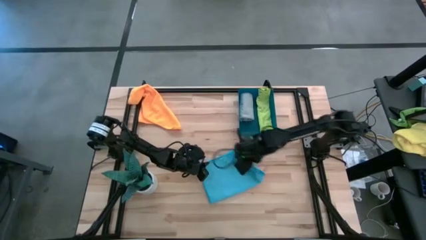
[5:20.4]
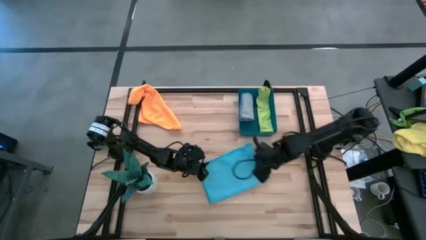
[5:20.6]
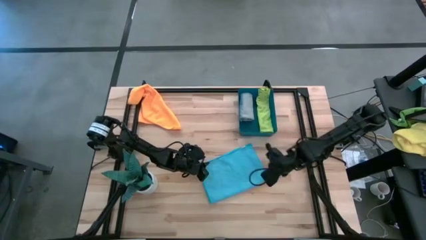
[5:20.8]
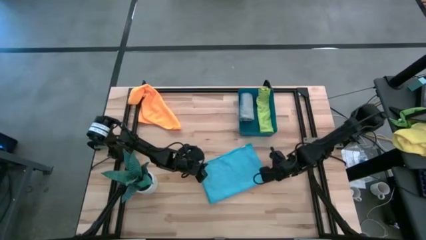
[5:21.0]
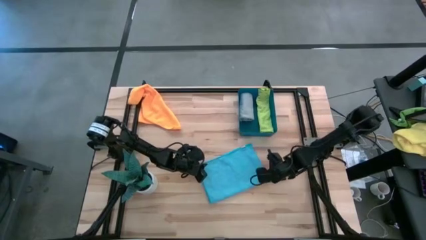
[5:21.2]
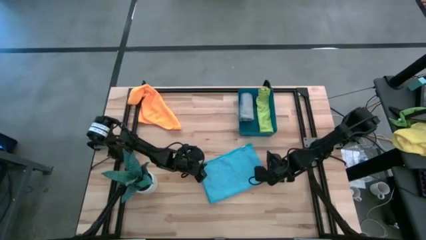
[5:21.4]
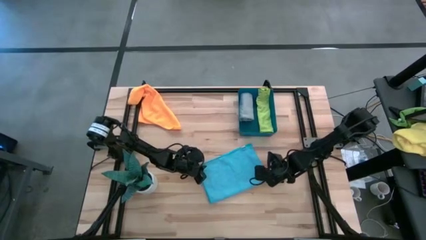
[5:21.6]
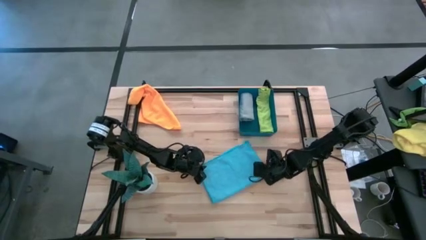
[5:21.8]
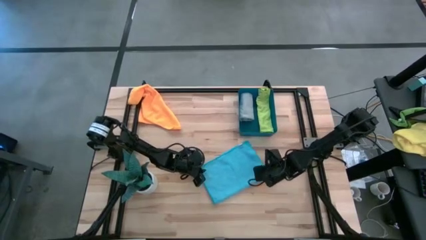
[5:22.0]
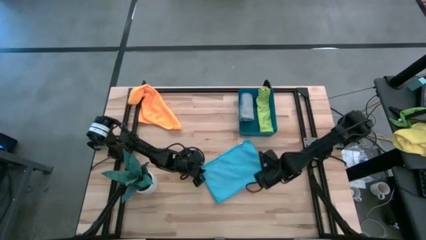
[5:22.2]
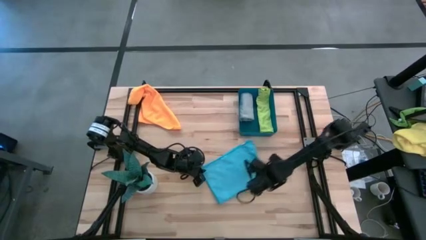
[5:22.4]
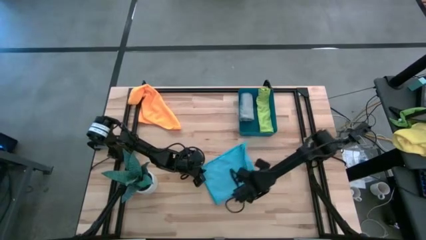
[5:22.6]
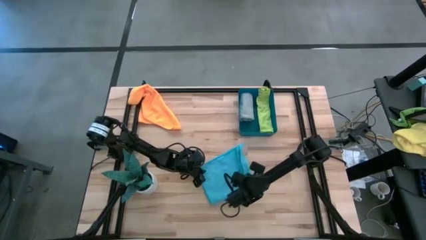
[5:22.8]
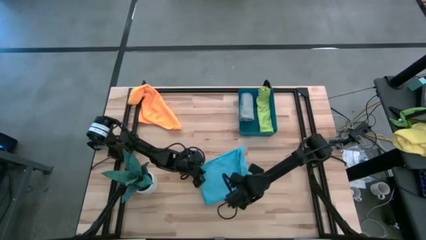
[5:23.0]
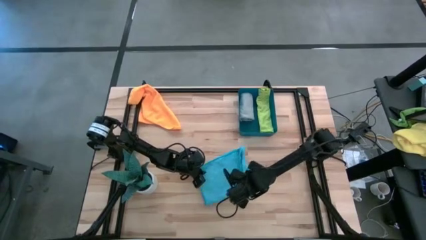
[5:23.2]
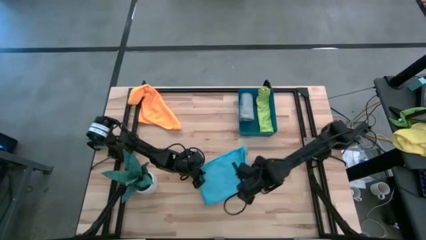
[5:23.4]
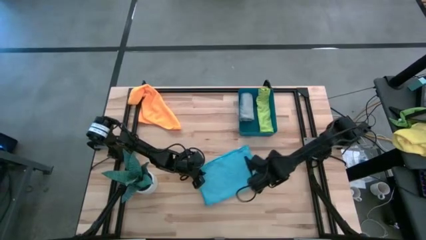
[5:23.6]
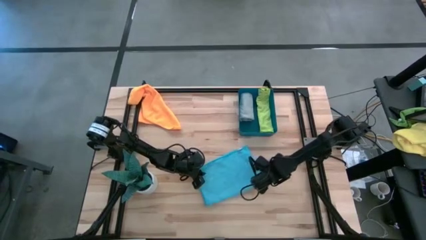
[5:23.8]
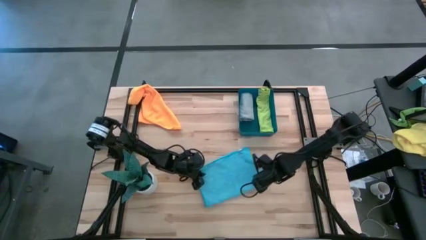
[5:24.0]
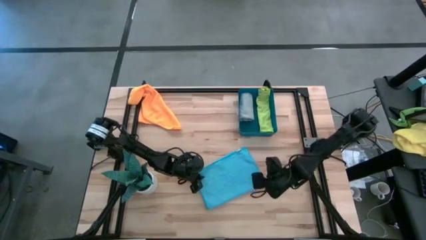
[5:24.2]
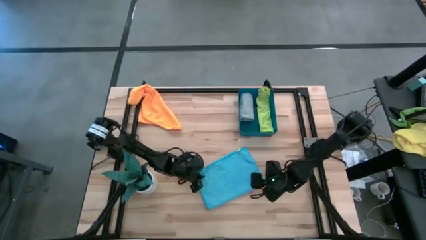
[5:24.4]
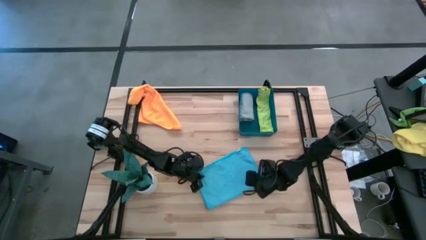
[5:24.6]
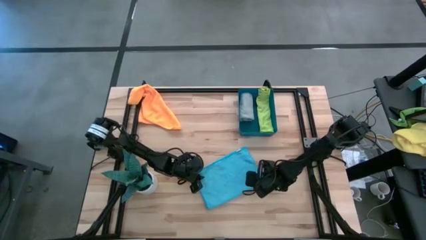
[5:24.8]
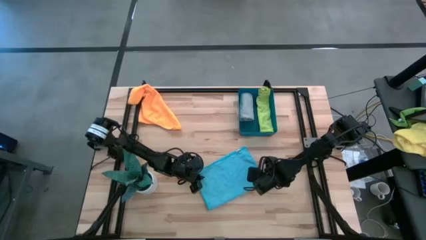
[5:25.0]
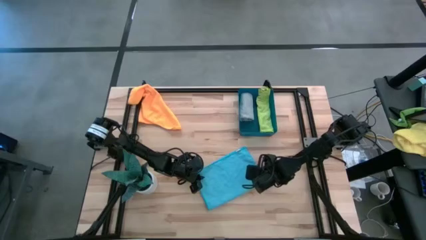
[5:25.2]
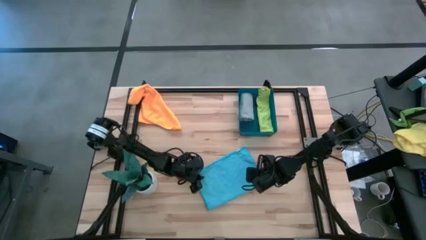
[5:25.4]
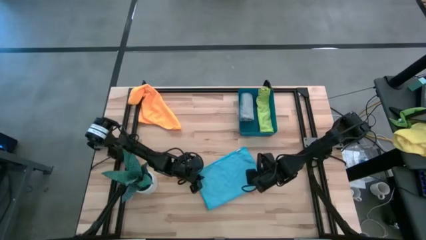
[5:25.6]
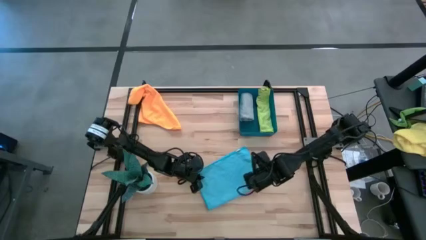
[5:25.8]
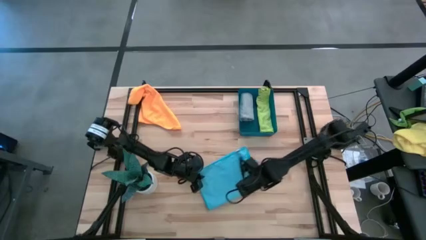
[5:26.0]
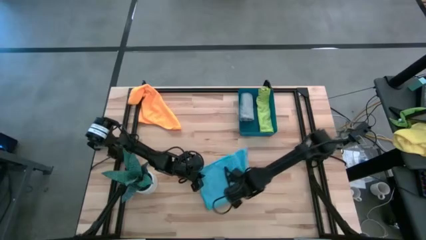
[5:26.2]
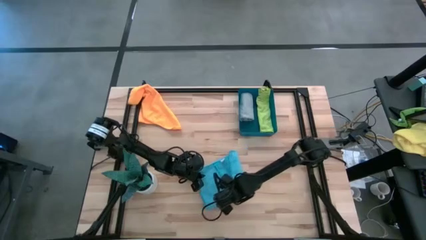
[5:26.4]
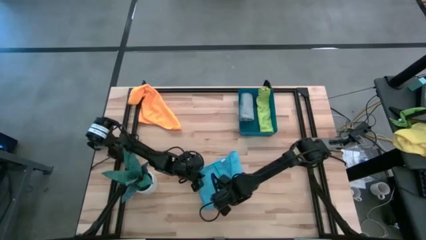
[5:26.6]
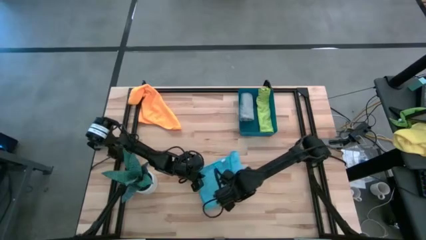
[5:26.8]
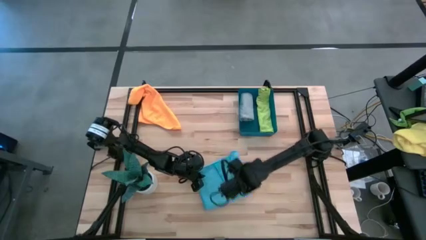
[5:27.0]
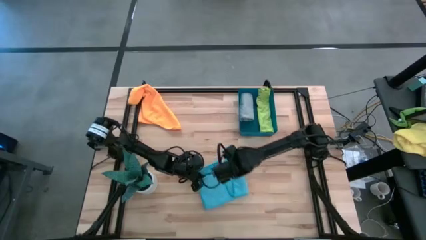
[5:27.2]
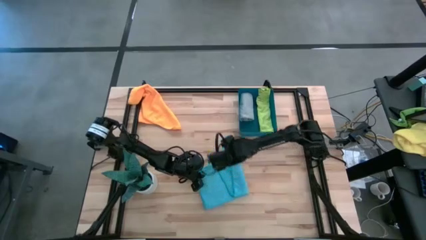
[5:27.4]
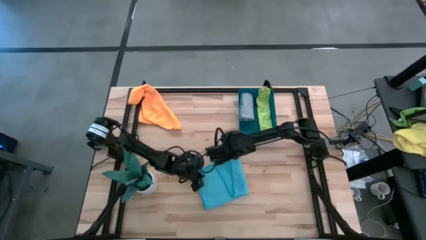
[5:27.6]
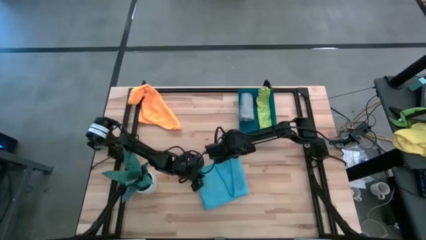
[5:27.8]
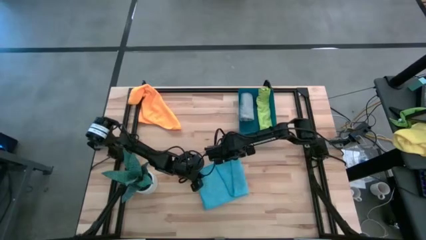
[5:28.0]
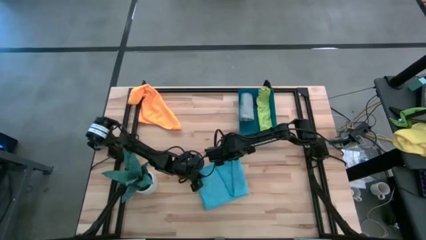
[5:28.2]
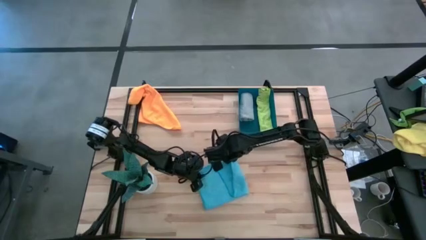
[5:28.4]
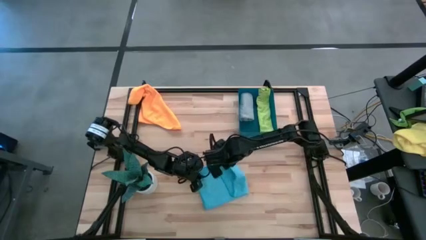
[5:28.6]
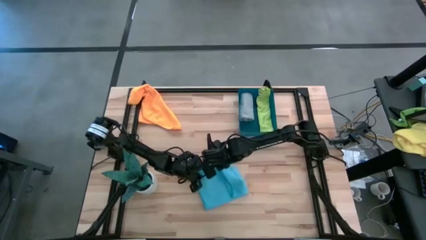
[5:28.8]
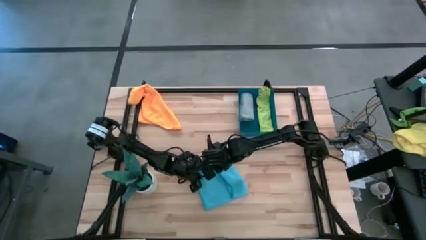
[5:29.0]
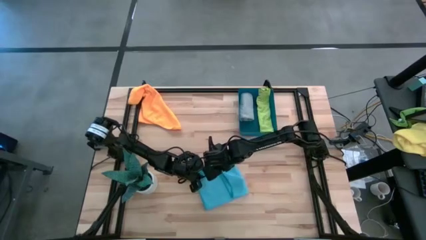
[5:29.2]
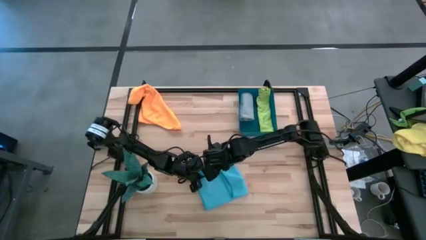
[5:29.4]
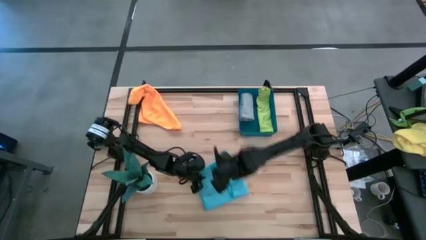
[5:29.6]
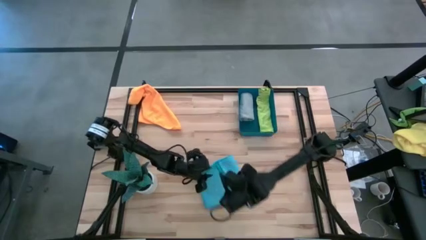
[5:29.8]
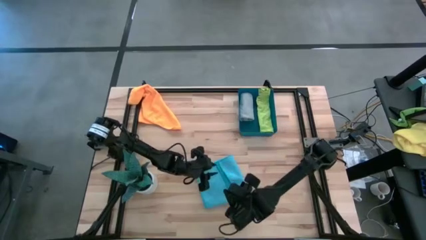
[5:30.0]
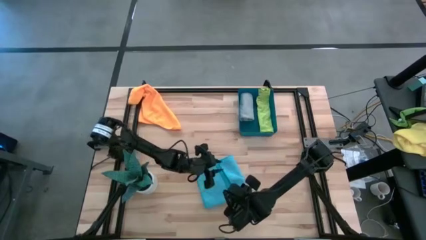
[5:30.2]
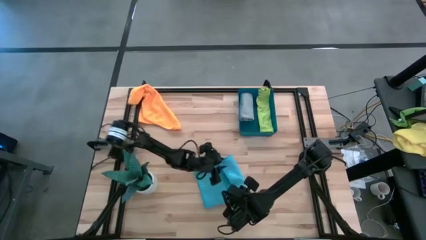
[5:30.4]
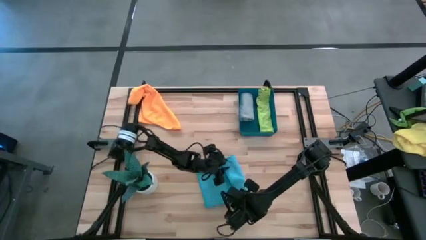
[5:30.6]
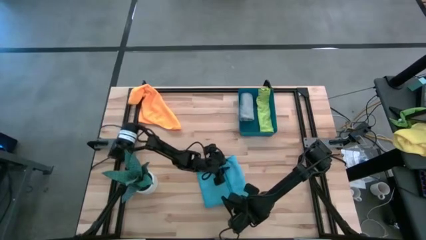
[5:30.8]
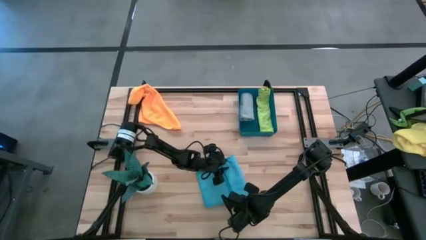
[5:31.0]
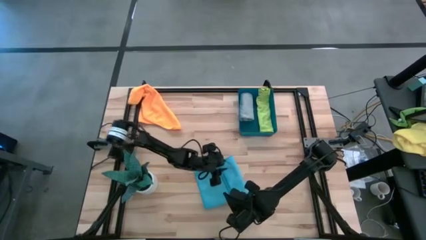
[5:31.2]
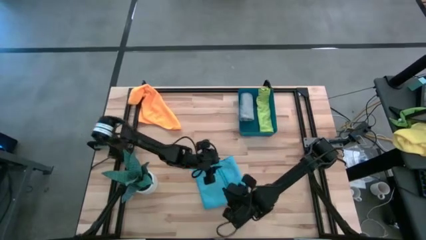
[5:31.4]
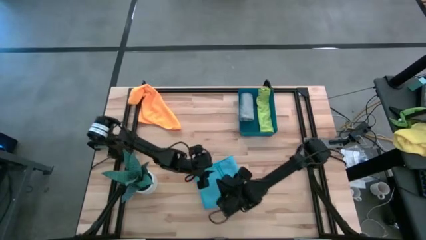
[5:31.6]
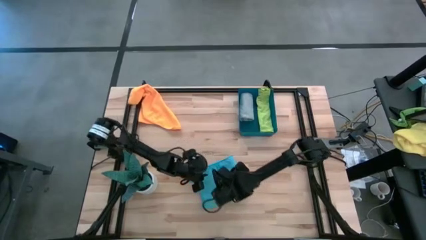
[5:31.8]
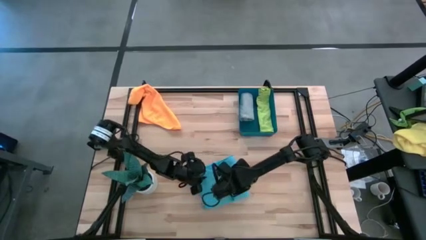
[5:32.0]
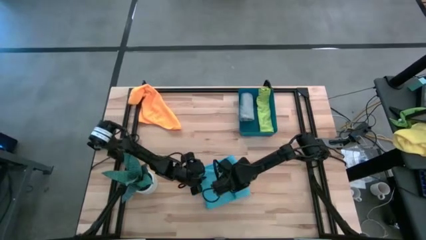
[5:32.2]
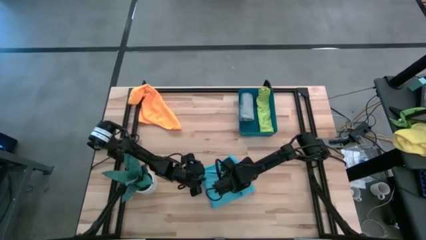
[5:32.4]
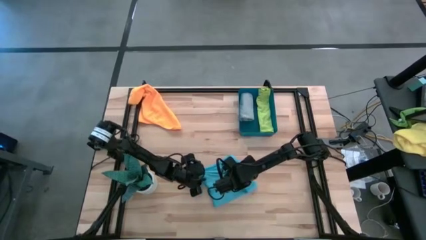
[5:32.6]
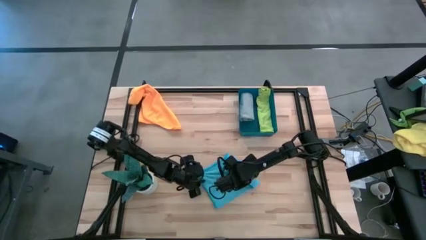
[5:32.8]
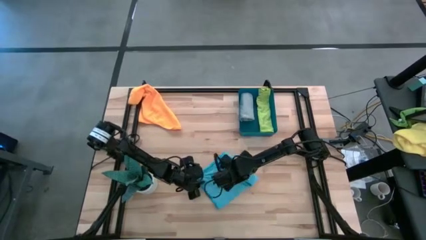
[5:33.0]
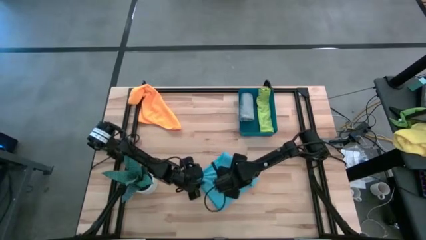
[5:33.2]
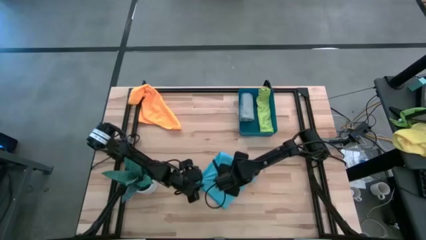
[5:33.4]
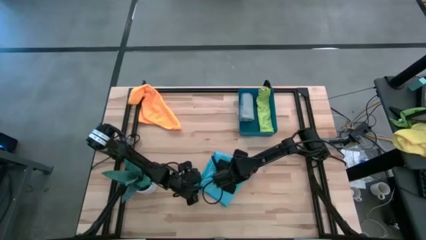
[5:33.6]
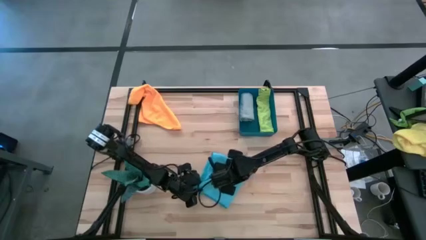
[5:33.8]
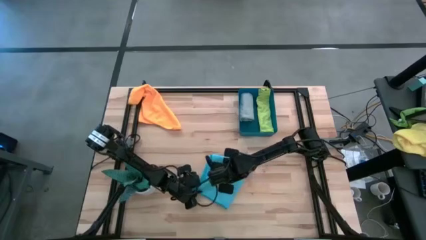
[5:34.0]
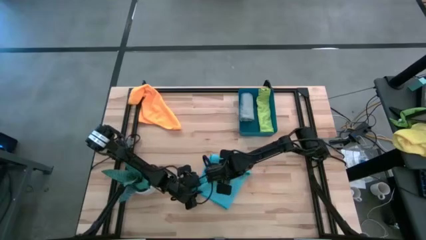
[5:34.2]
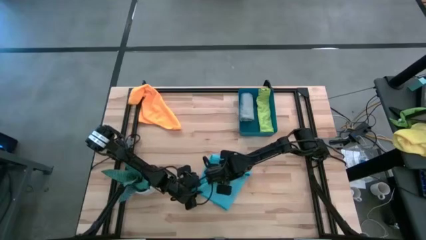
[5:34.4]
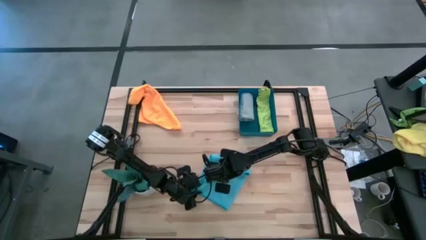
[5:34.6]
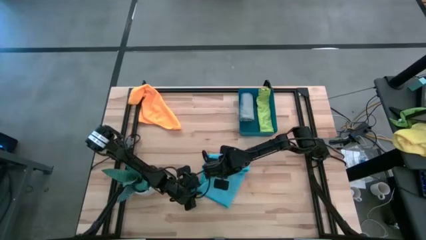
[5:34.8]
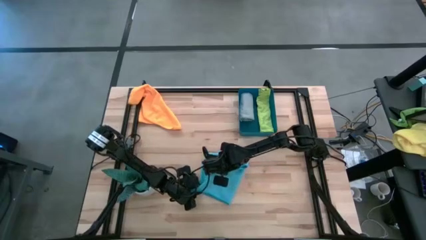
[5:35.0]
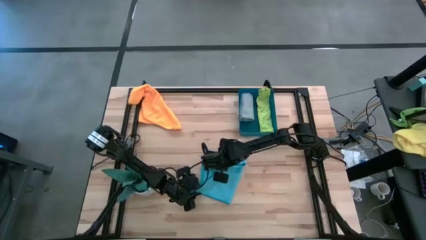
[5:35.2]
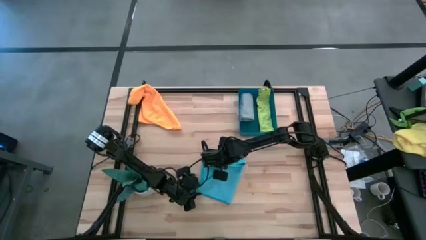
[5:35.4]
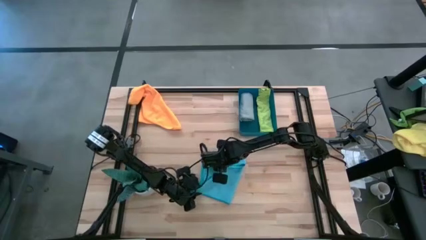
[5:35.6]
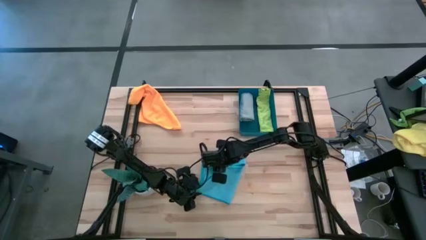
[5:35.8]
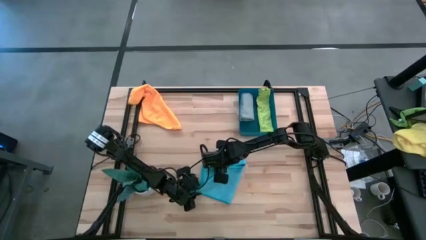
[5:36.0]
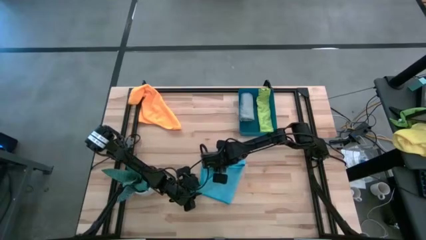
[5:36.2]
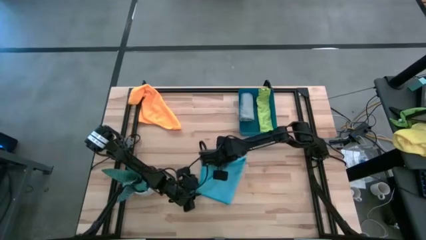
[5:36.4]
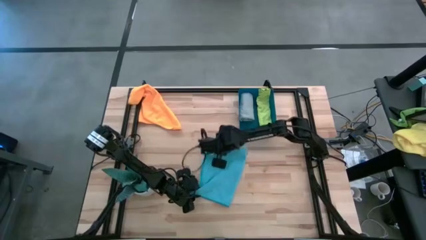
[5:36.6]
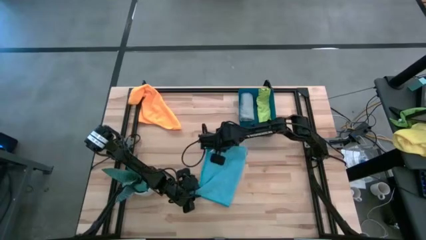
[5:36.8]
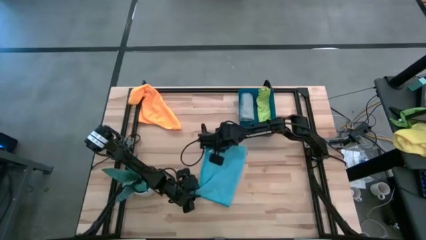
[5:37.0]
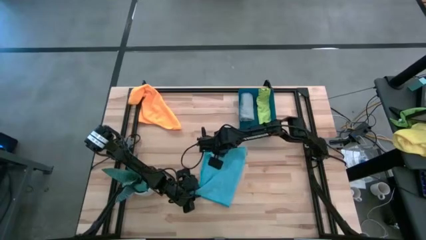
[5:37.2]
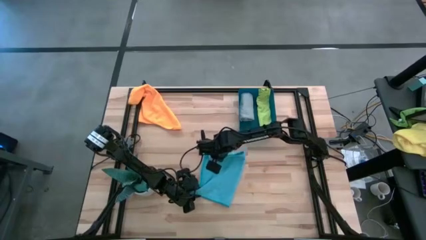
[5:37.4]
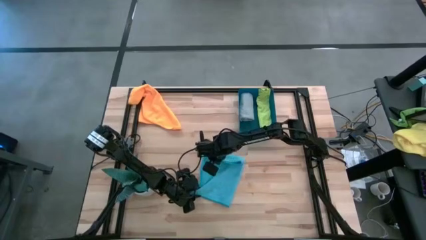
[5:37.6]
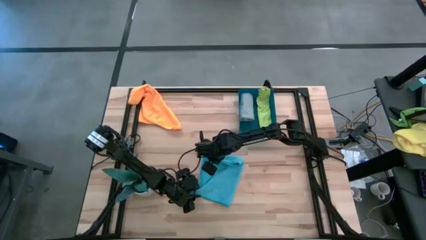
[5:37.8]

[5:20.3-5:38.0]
Task: Roll microfiber towels into tight, uniform cylinder then place into a basket
Roll the blue towel
